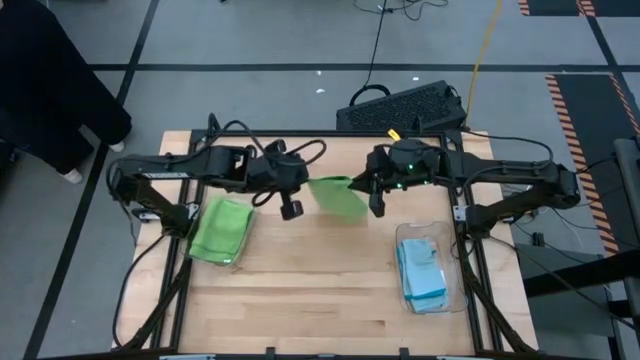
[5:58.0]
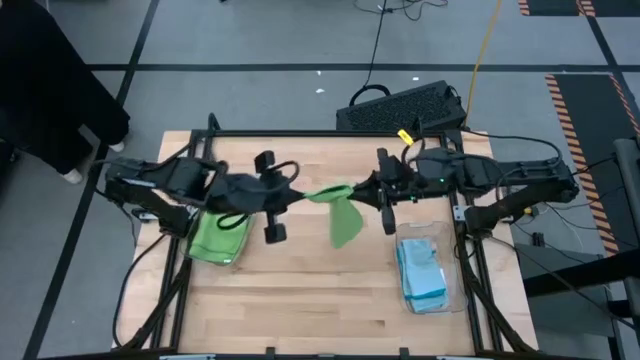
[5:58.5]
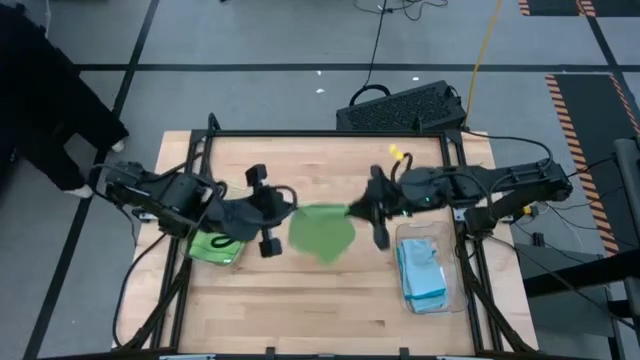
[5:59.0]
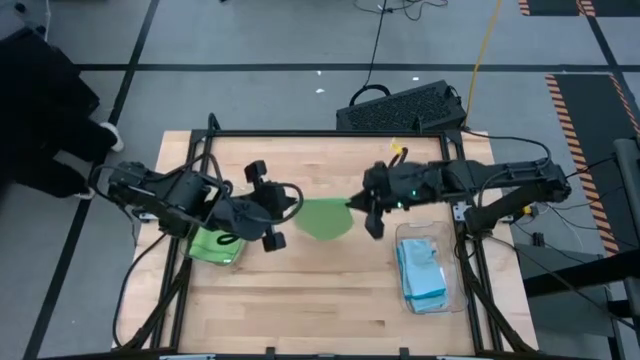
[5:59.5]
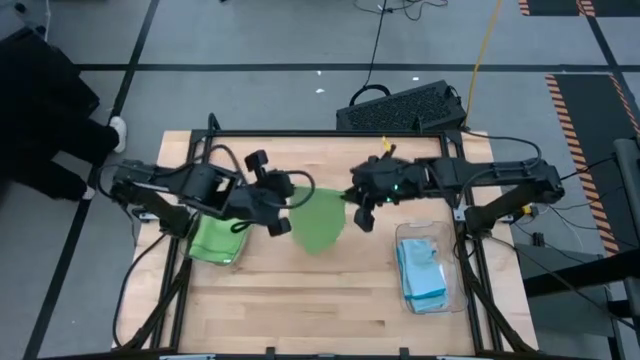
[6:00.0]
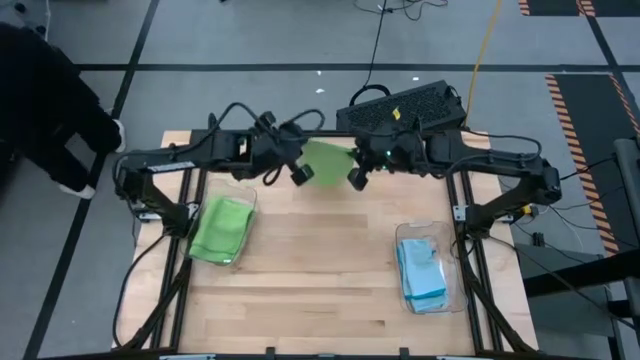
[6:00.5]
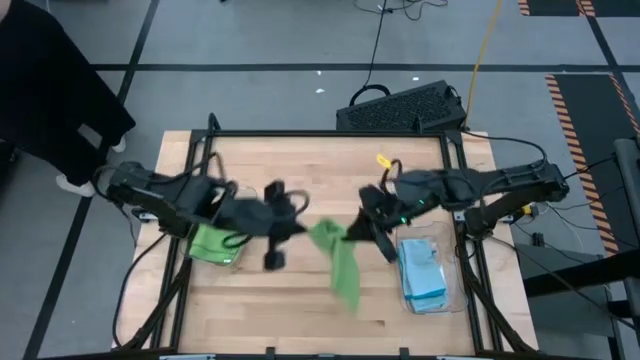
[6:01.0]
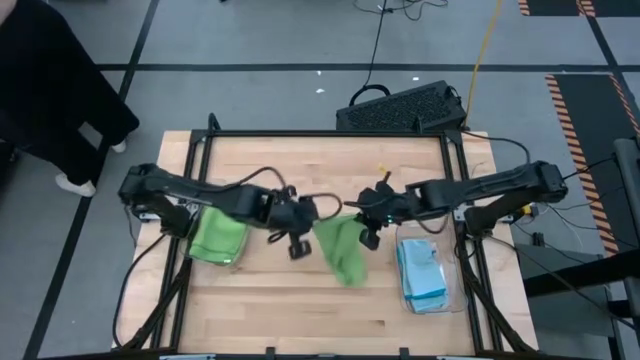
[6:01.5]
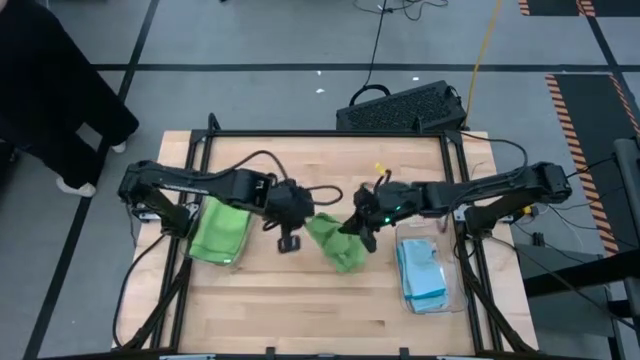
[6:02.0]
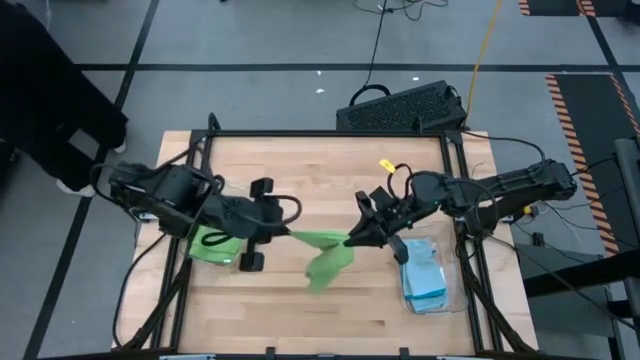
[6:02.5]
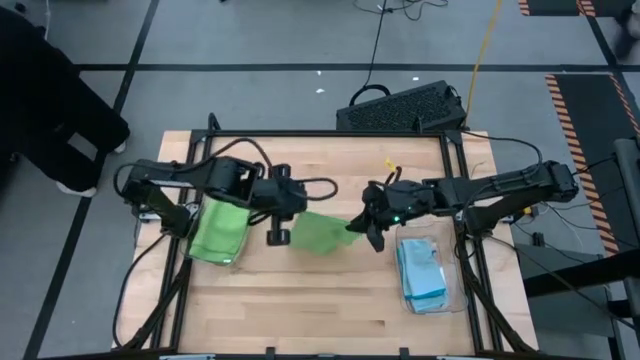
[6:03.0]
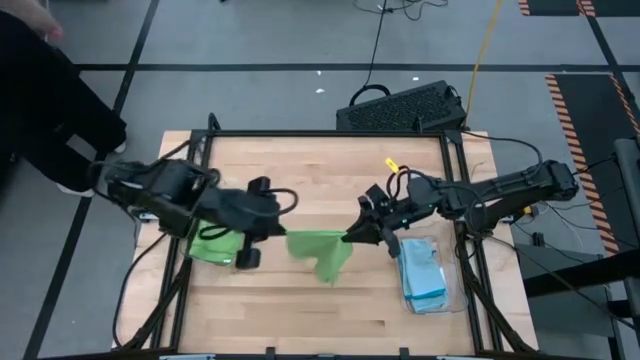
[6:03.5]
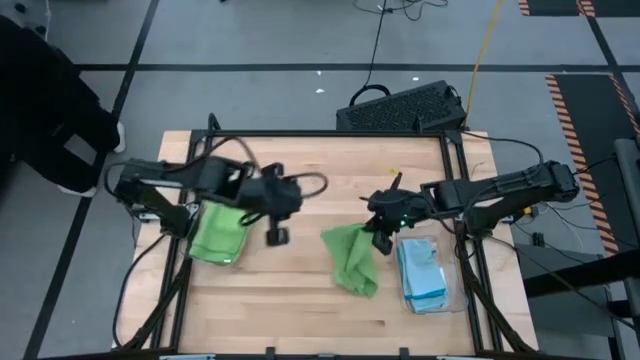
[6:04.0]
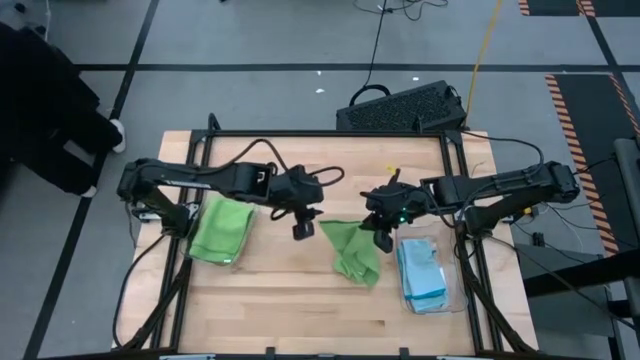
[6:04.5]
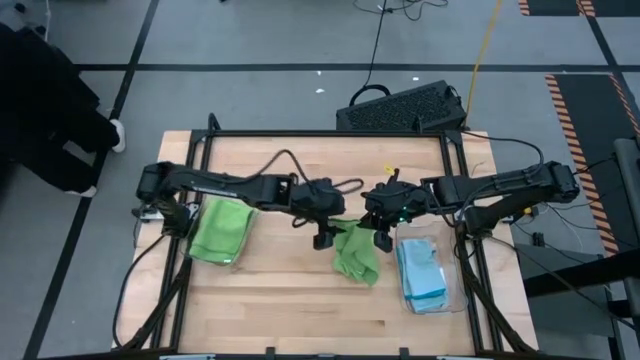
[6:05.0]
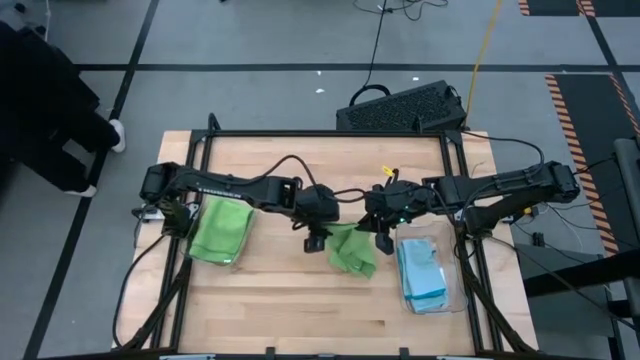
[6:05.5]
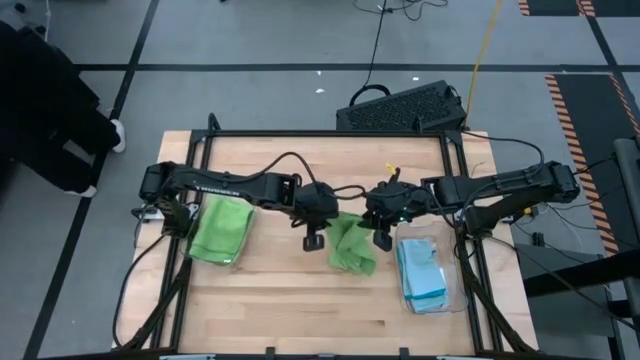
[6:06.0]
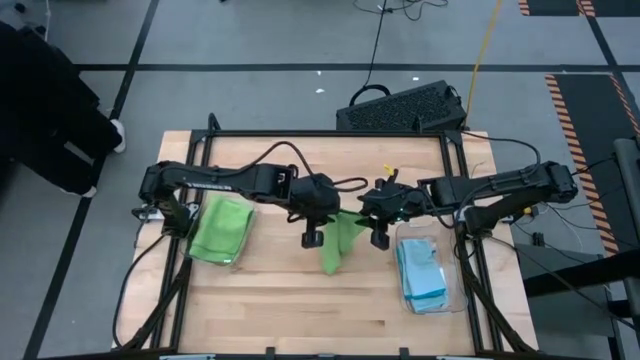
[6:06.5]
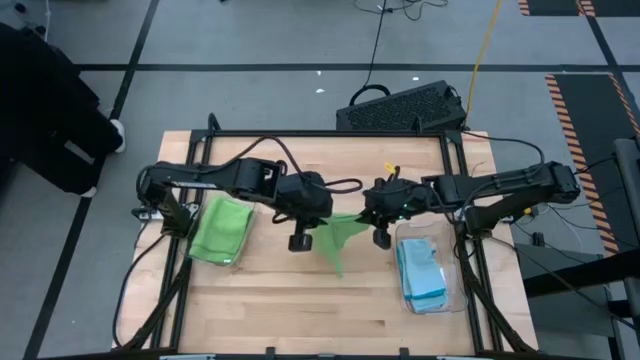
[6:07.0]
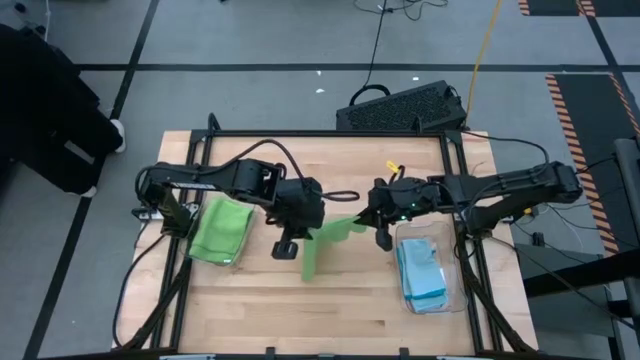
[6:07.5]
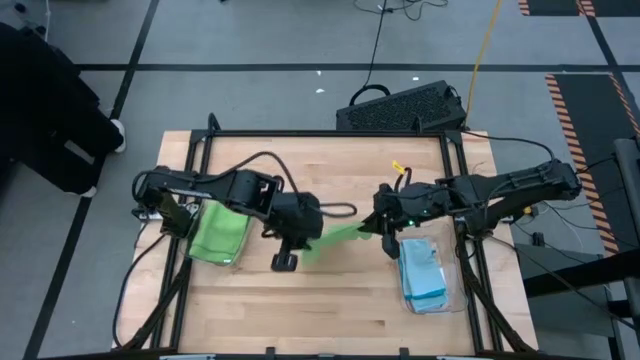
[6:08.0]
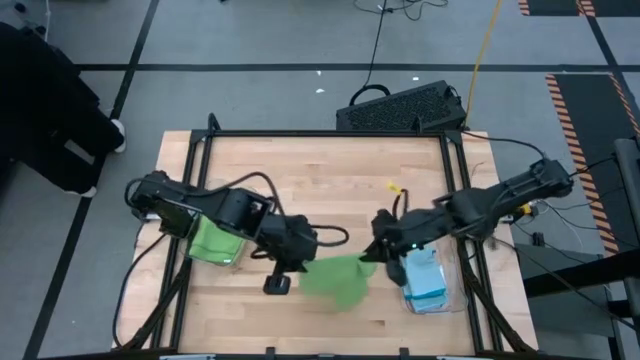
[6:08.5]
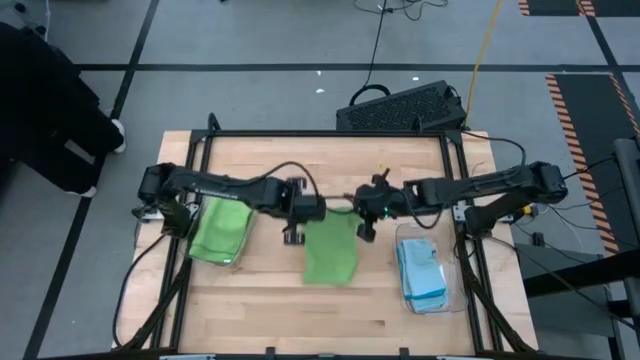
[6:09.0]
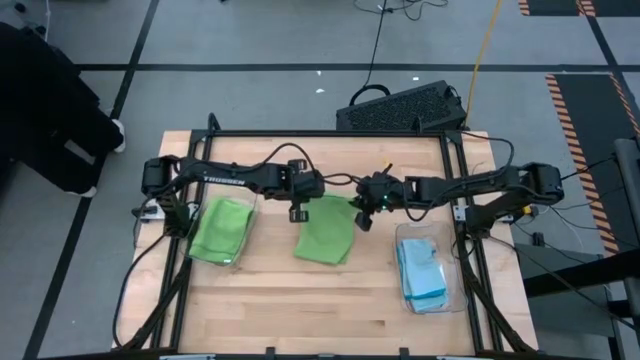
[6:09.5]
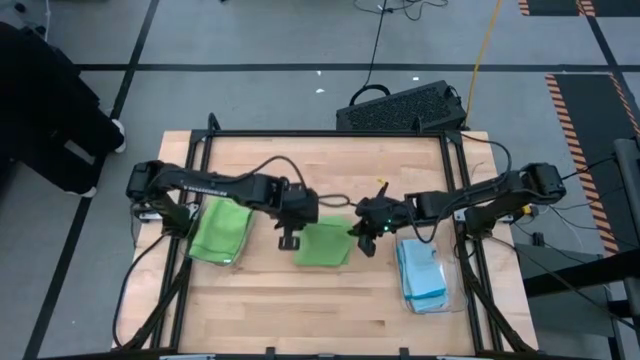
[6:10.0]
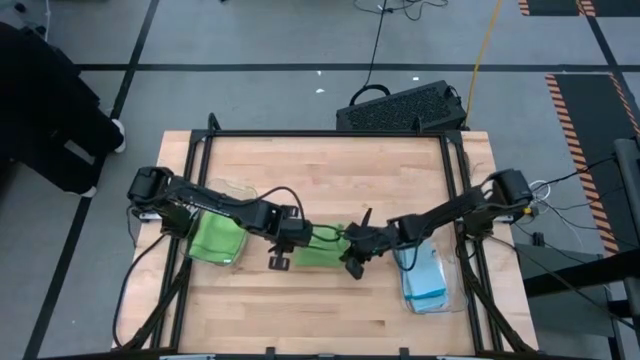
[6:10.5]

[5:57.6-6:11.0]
Task: Sort microfiber towel by color & place in baskets
Fold the green microfiber towel

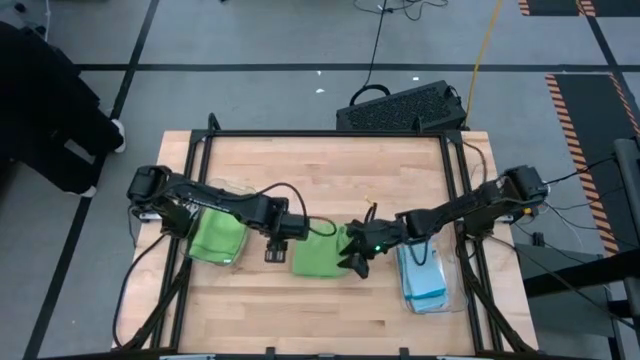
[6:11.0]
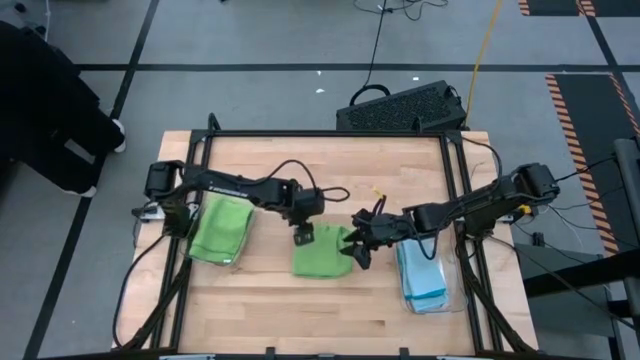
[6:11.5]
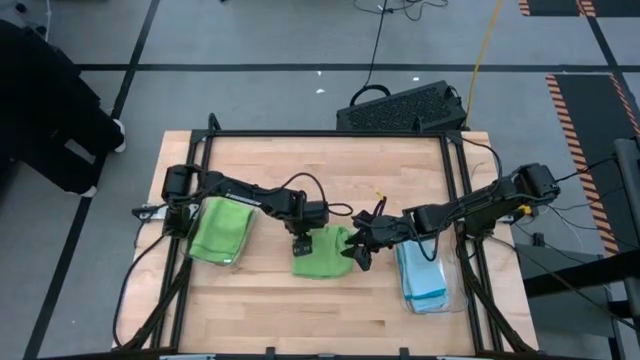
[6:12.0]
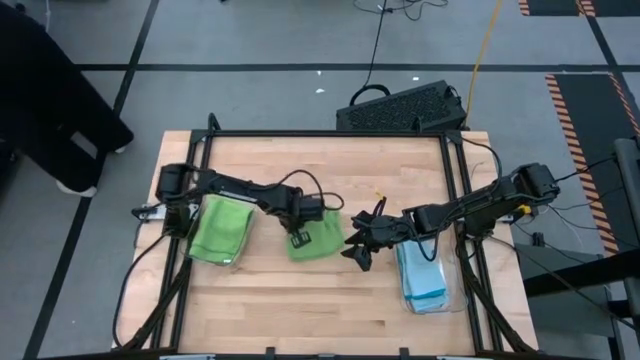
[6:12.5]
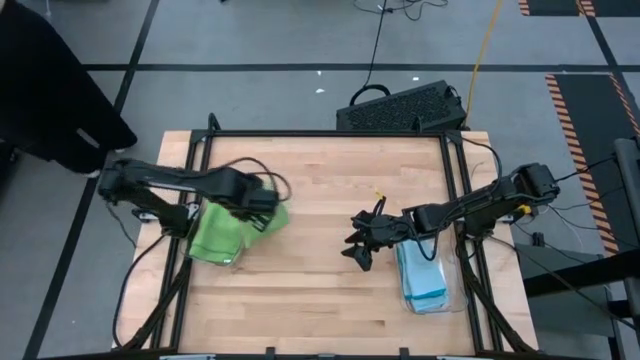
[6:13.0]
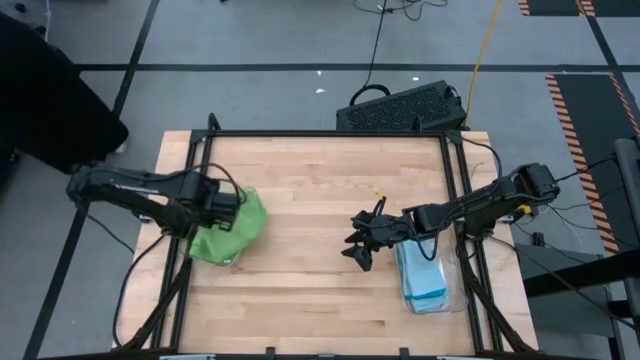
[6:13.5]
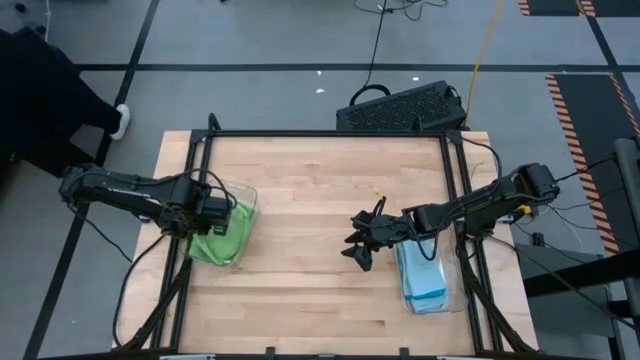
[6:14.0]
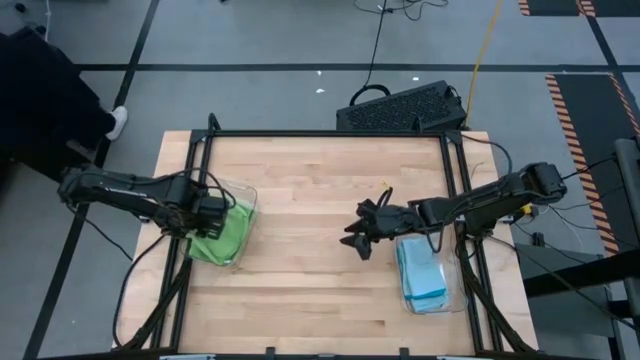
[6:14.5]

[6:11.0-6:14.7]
Put the folded green microfiber towel into the left transparent bin

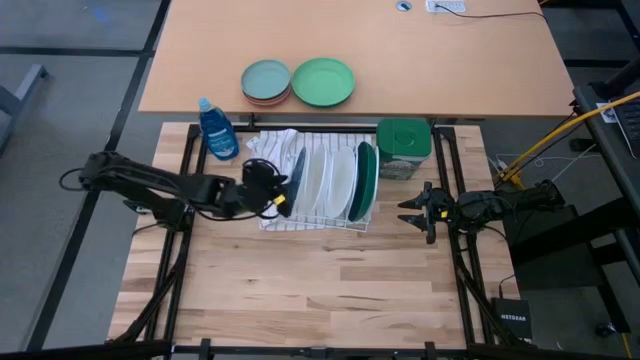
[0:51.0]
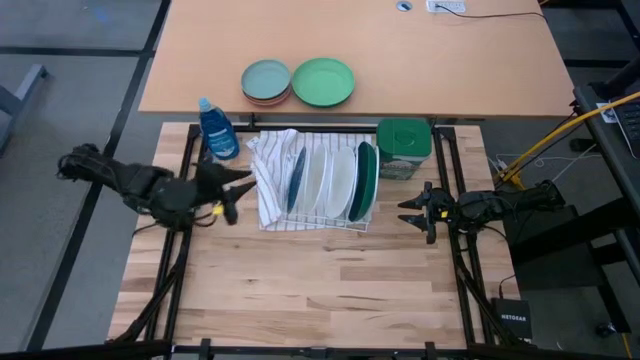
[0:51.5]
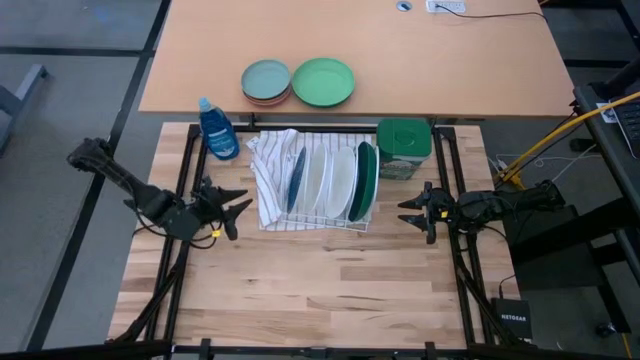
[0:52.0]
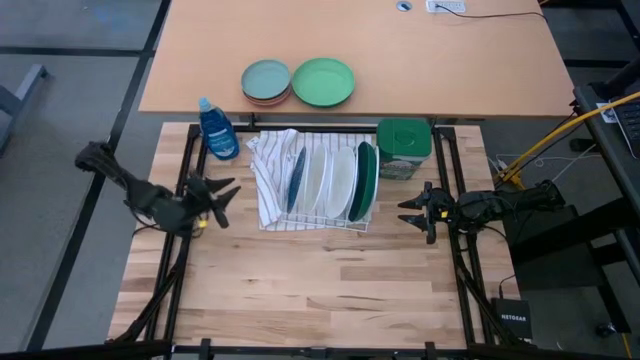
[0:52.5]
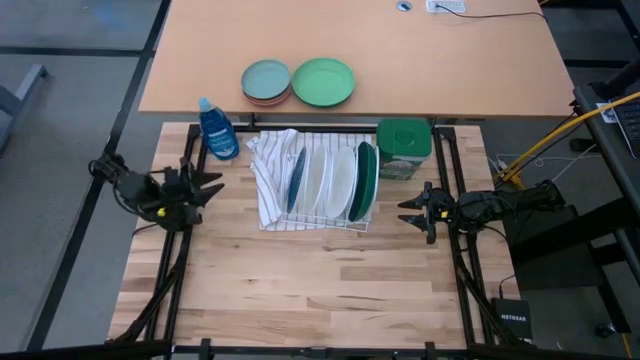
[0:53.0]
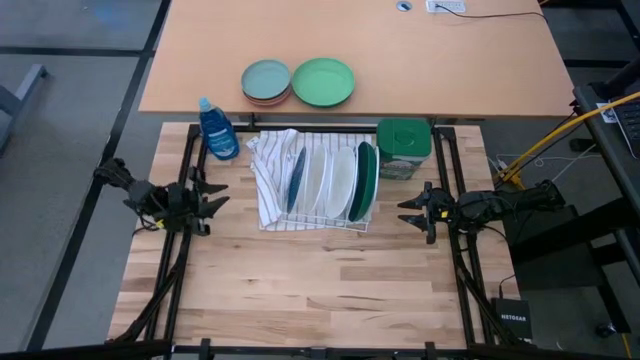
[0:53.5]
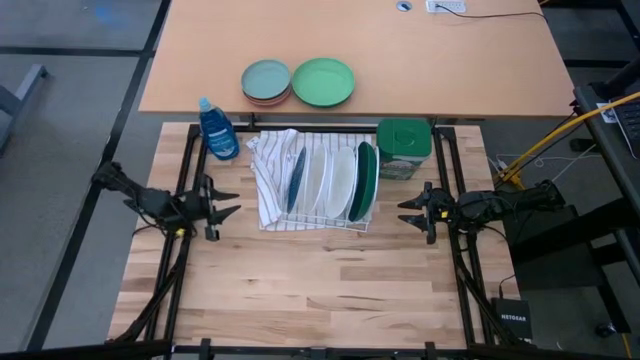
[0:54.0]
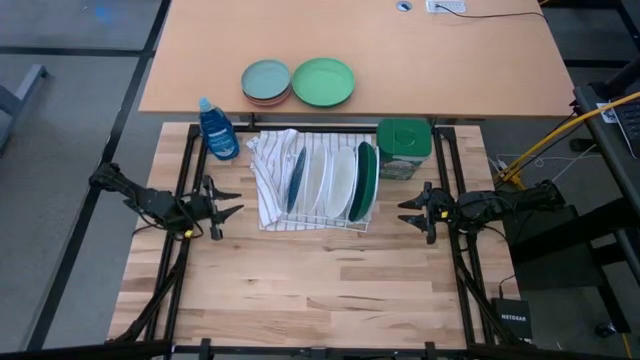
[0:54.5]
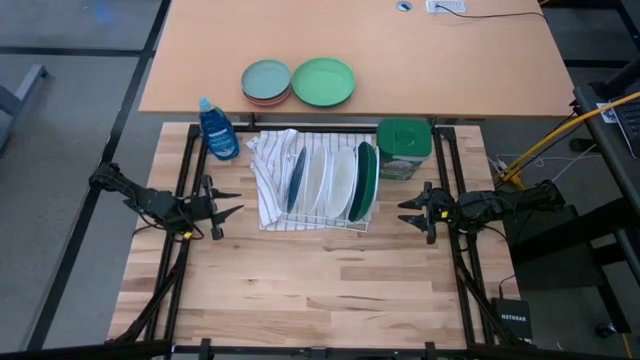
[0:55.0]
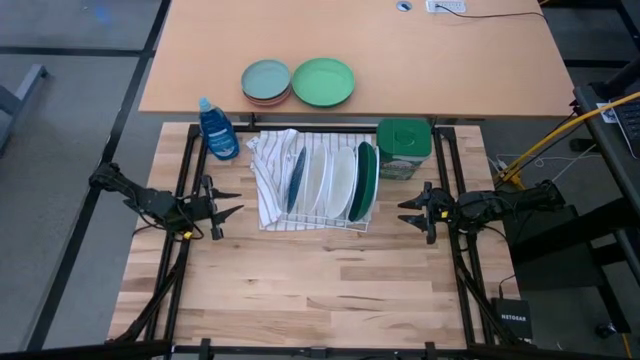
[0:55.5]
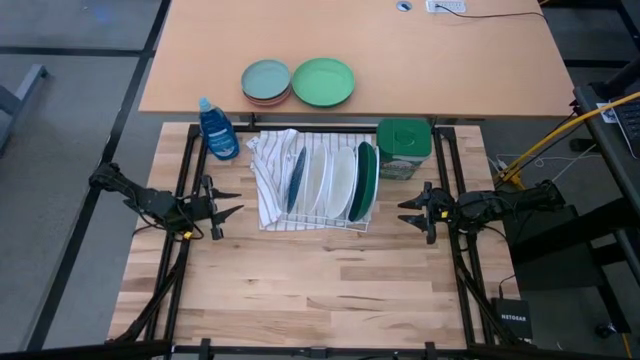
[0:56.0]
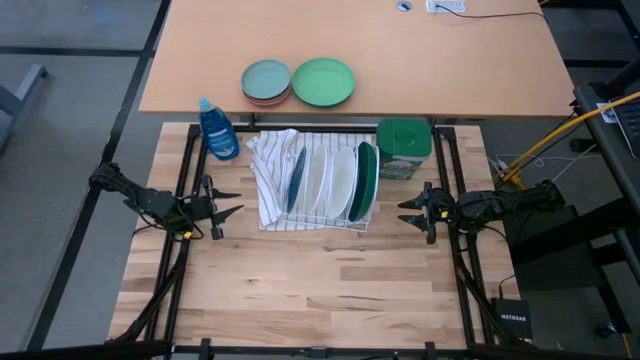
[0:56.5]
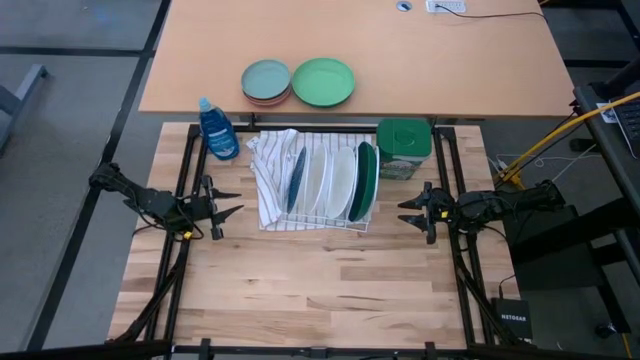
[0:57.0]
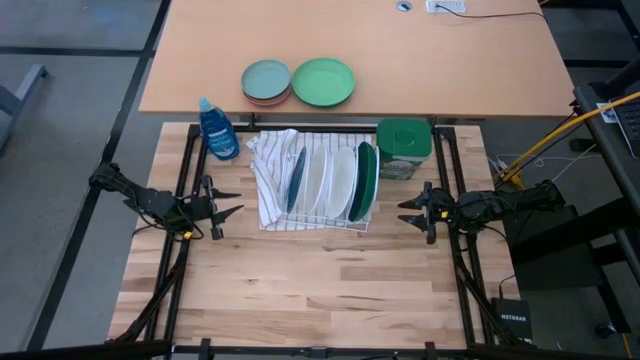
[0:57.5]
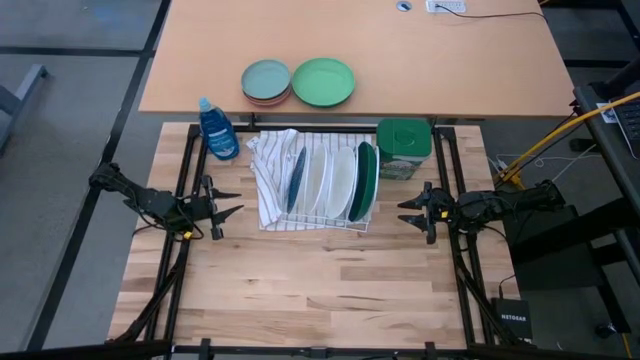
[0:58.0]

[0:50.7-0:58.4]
Task: Sort dishes
Return to Home Position
